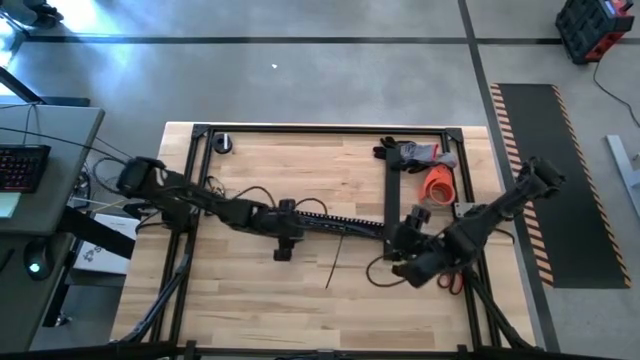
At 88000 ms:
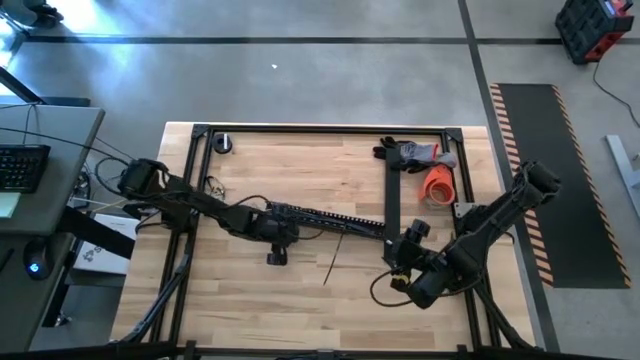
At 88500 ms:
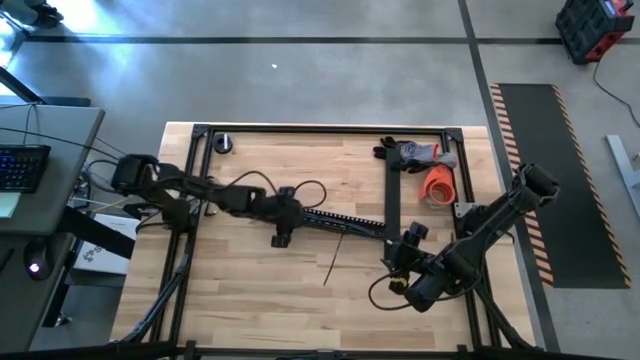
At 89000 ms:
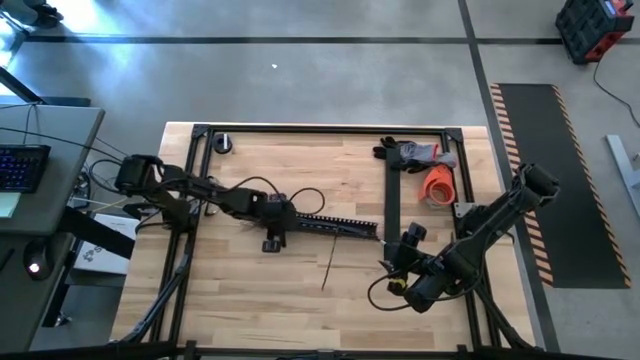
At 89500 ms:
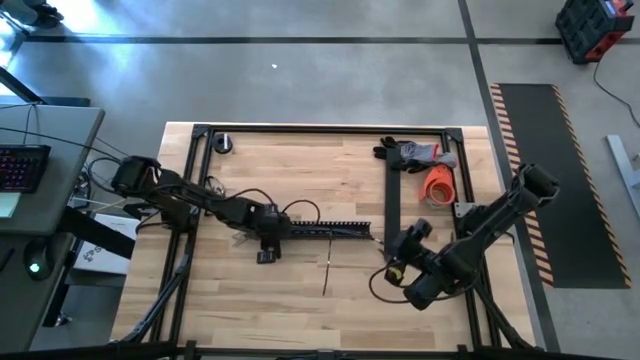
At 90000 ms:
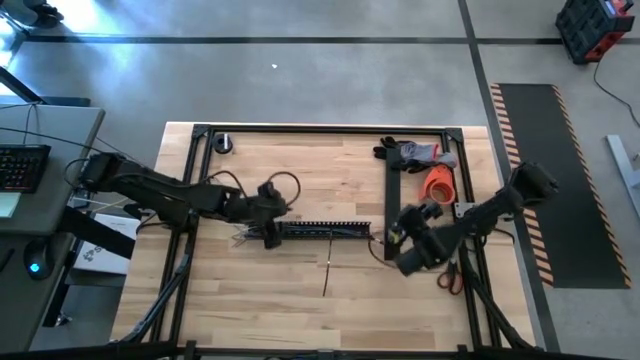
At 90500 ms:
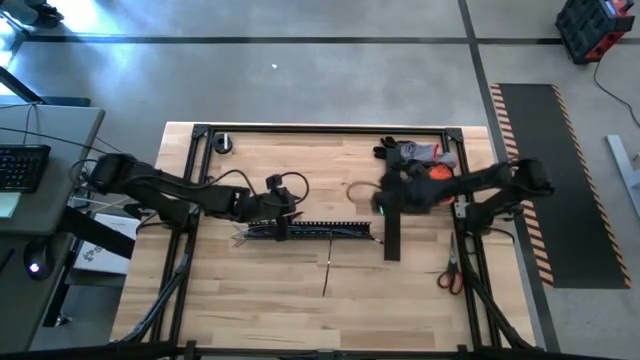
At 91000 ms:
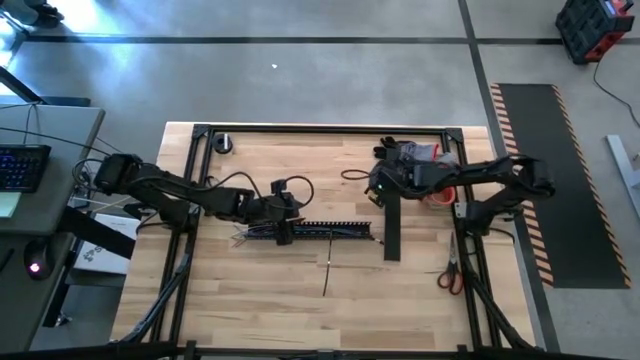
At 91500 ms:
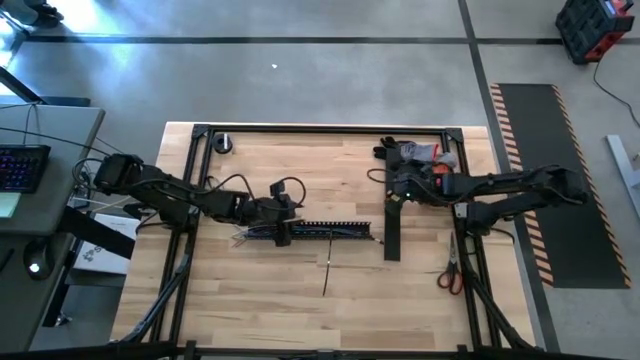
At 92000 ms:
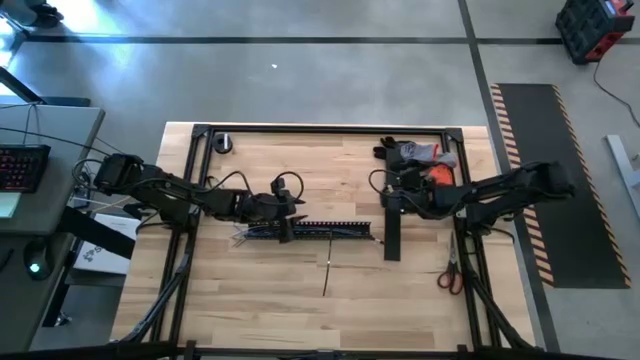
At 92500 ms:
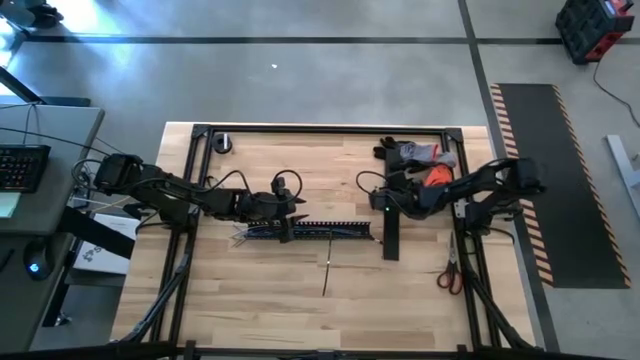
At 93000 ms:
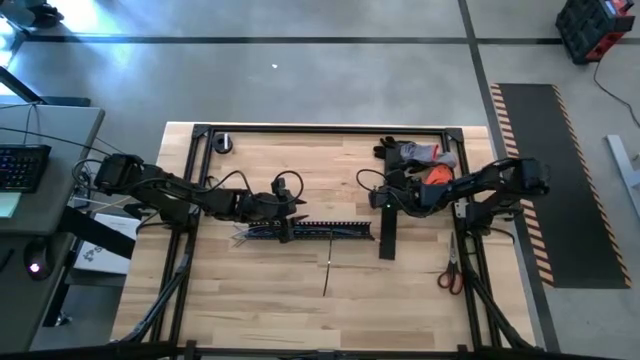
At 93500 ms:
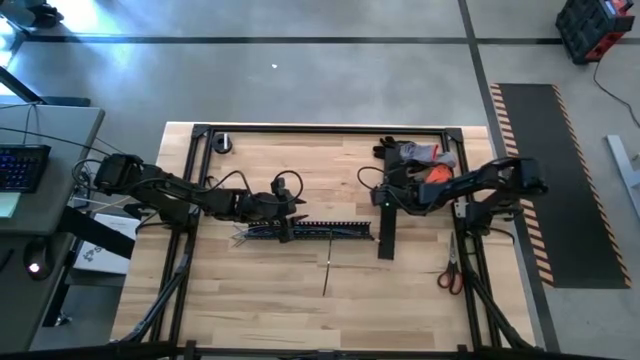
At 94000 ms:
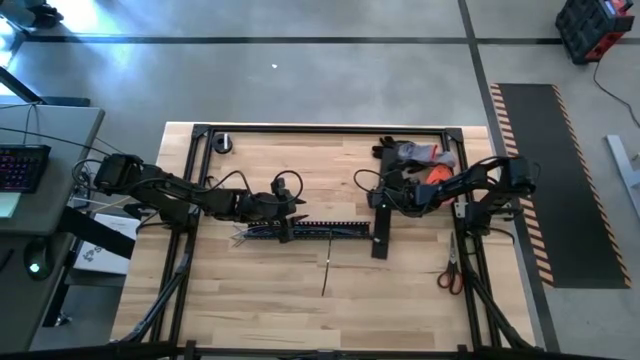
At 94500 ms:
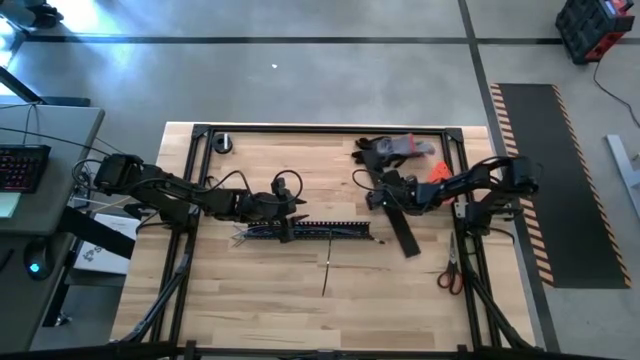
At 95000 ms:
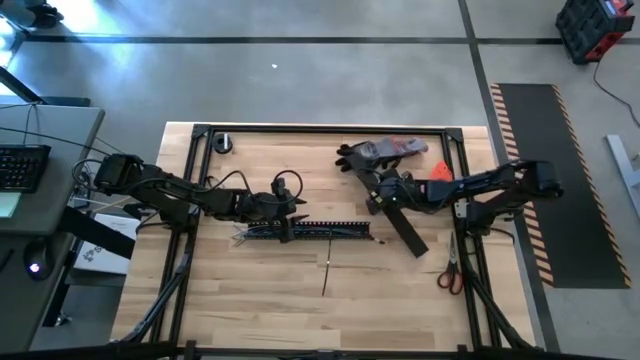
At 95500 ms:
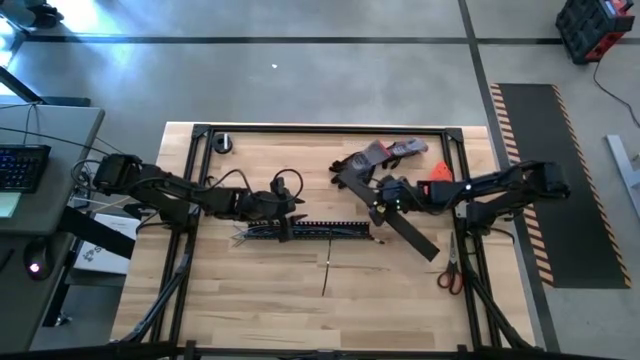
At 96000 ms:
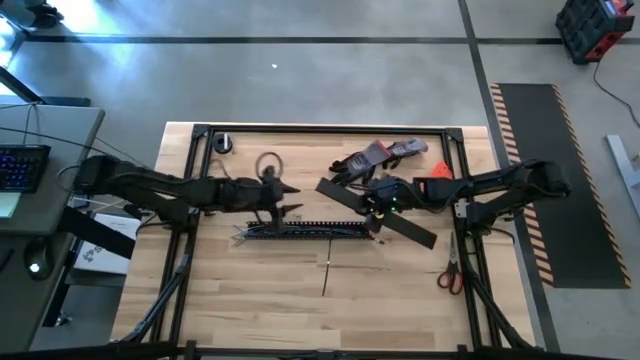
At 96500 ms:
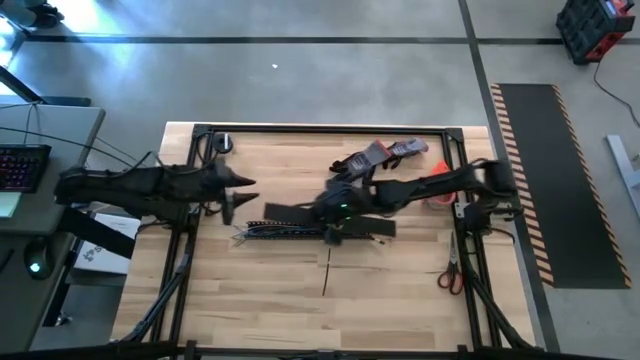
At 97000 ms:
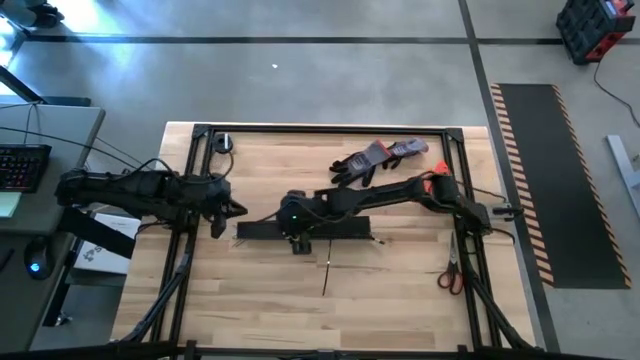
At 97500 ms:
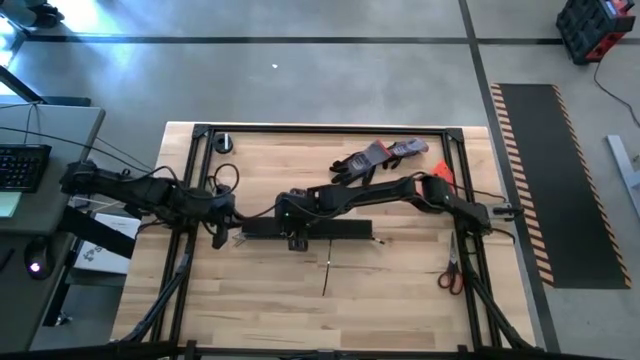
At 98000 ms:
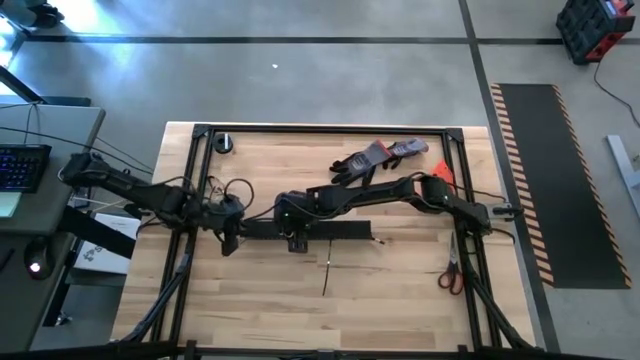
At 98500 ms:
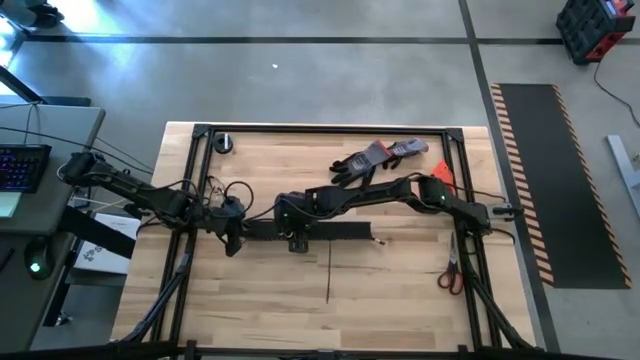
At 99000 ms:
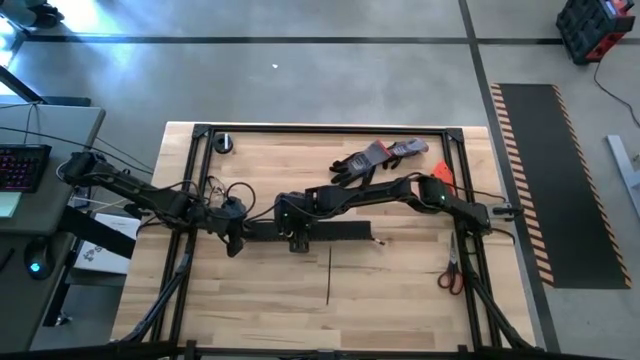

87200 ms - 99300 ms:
Task: Ziptie cables
Close the black cable duct using the black cable duct lid

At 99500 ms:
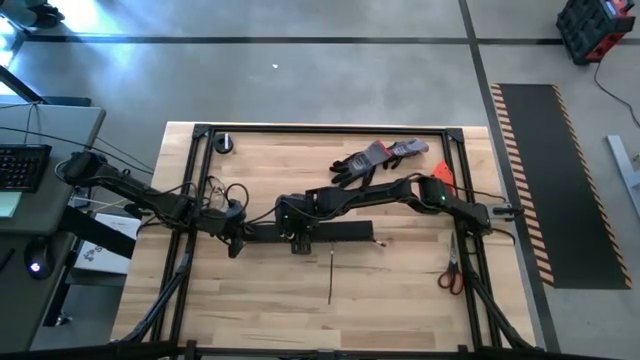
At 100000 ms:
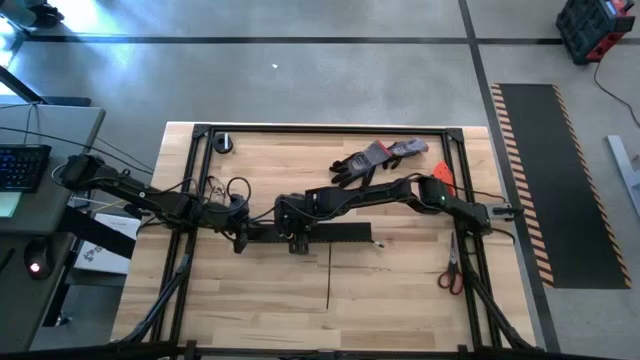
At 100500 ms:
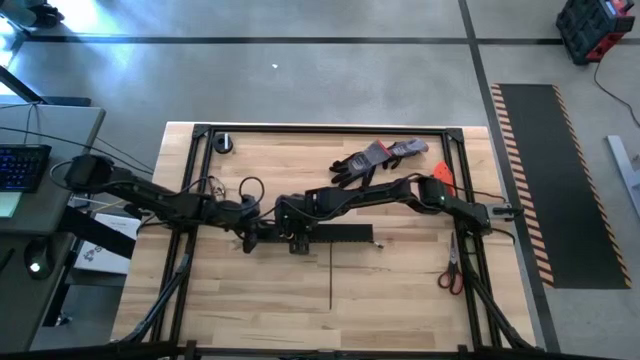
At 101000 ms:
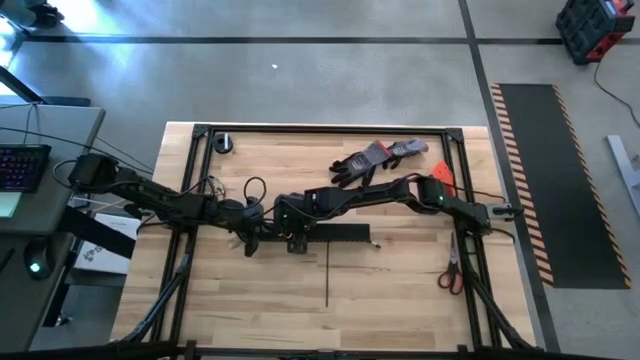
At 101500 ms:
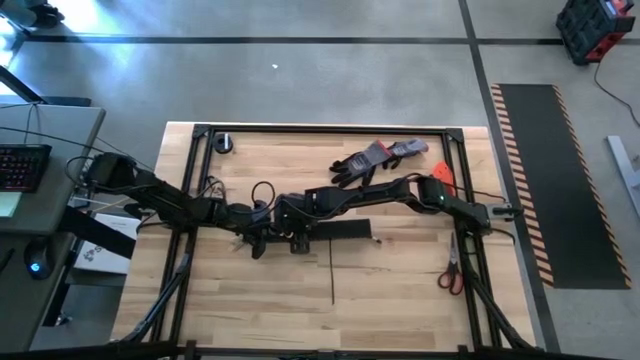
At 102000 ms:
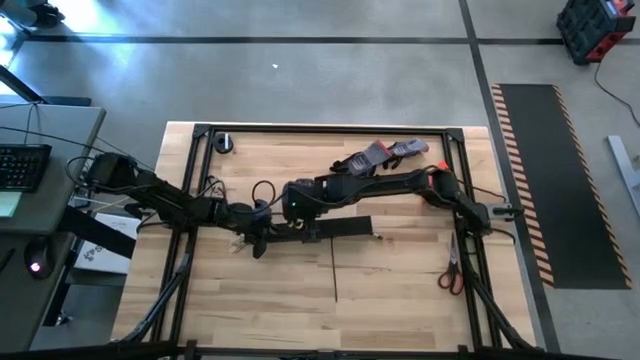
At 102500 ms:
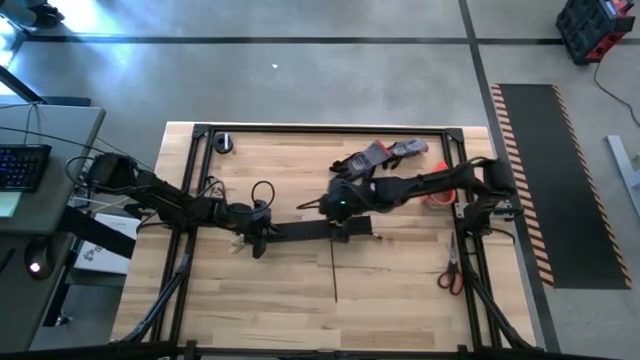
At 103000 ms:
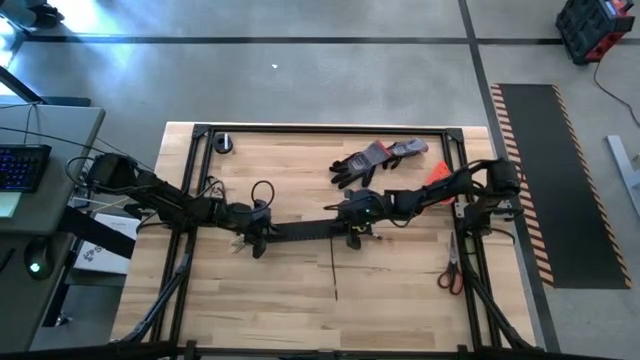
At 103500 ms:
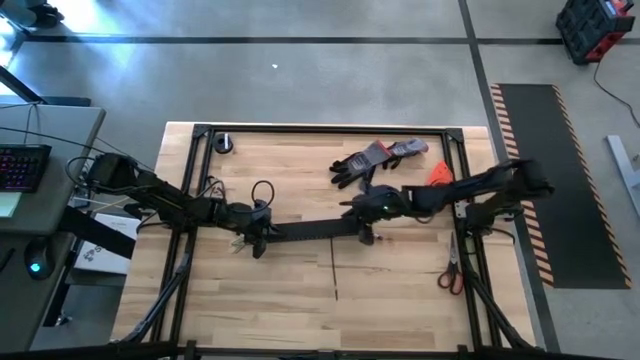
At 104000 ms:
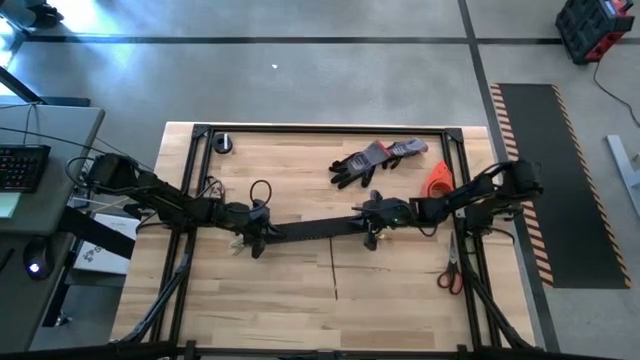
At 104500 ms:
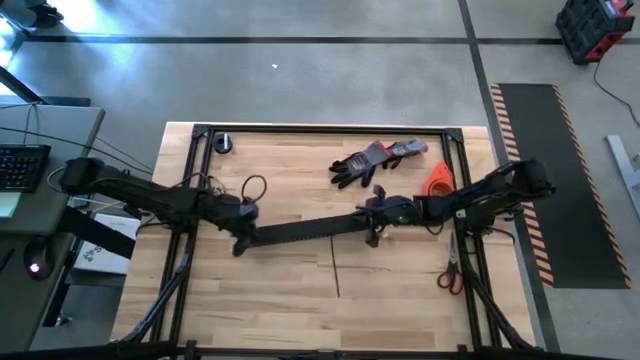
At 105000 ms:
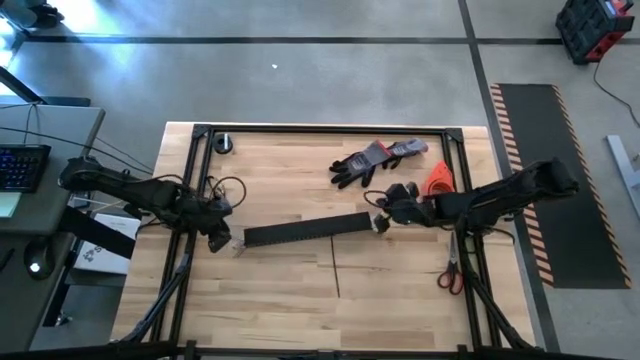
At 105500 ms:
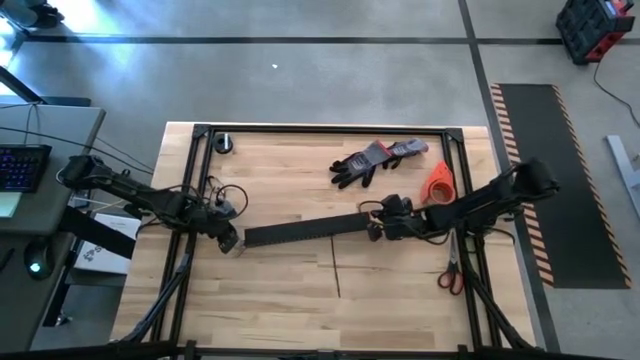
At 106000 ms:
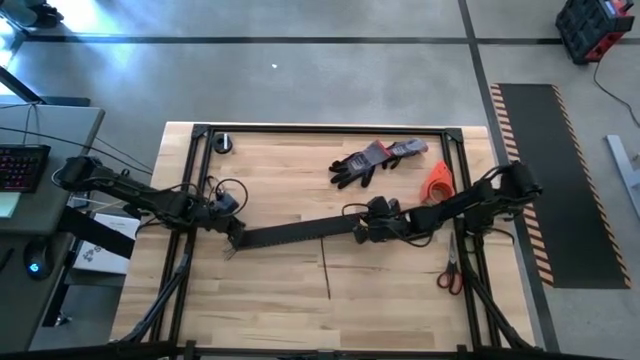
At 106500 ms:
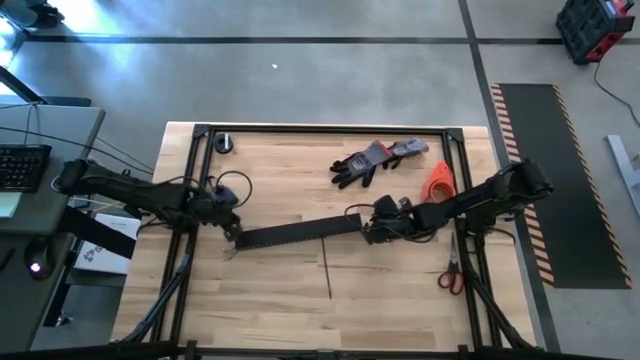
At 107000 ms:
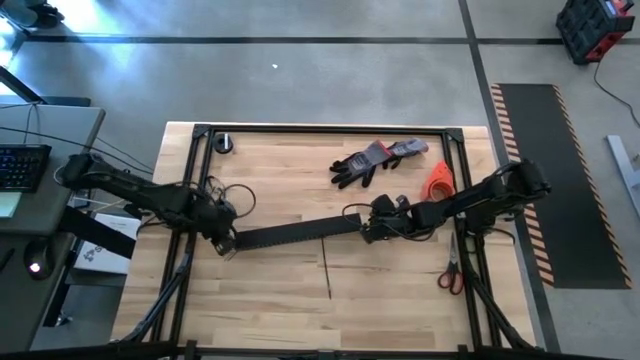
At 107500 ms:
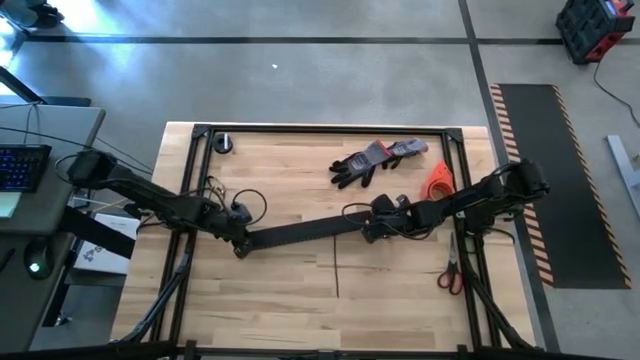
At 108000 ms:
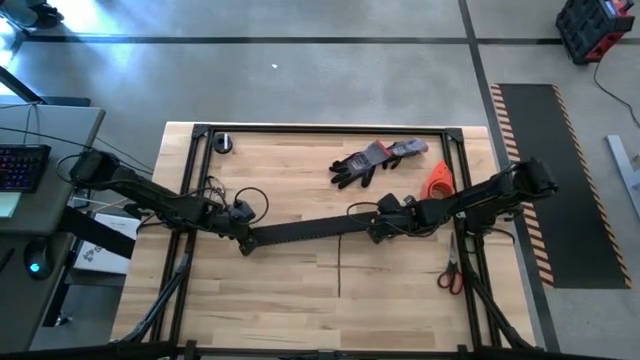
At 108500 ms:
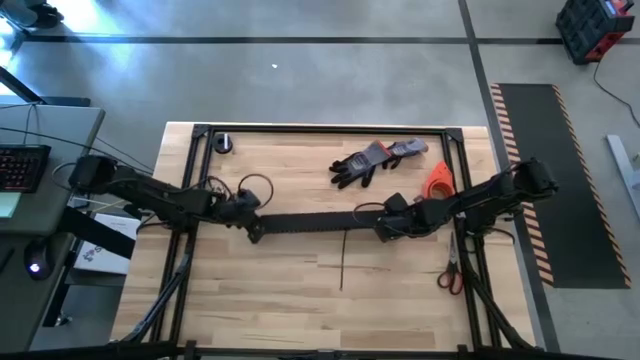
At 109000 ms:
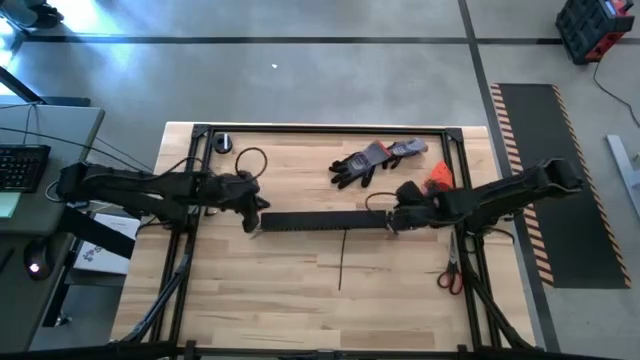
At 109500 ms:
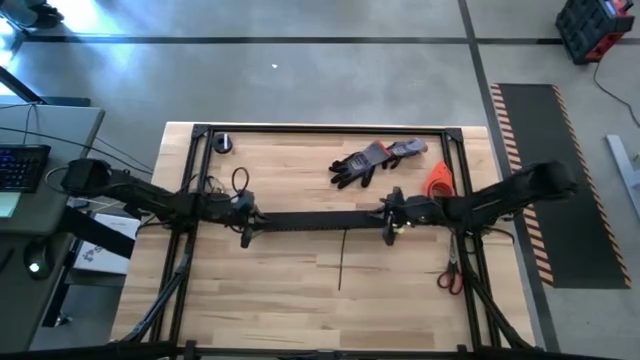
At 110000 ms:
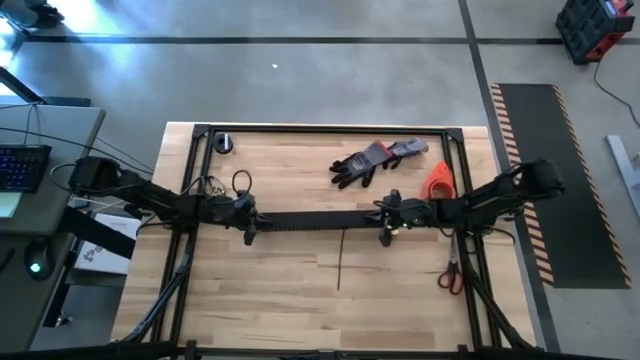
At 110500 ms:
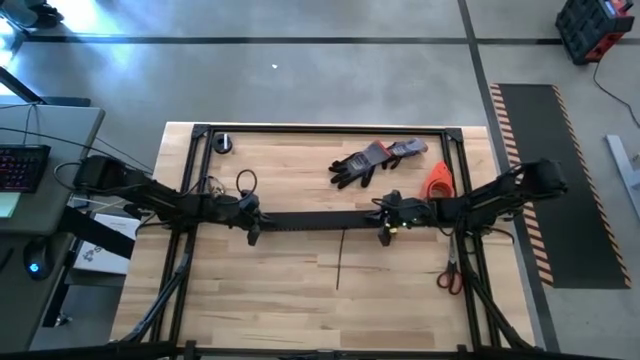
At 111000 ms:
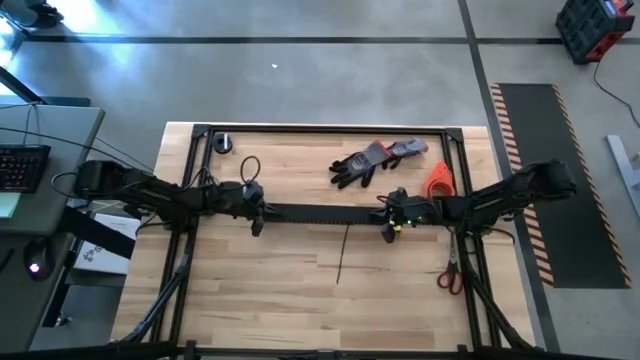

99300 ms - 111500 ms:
Close the black cable duct using the black cable duct lid
